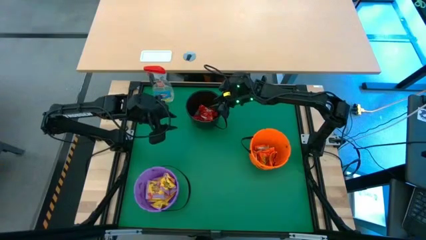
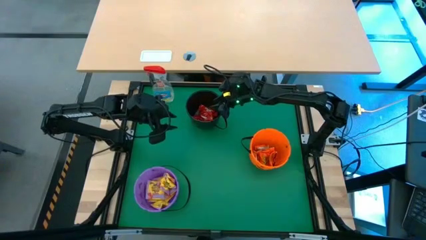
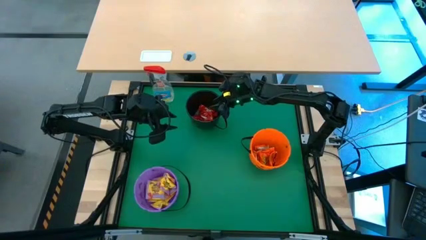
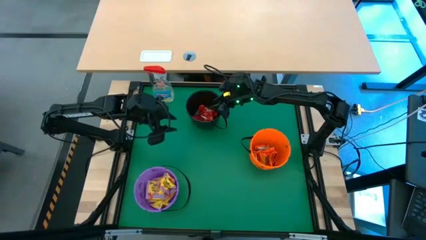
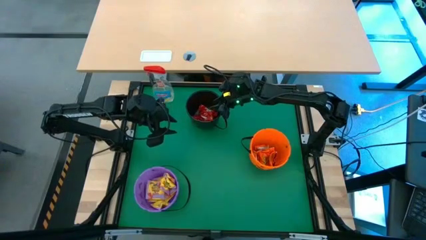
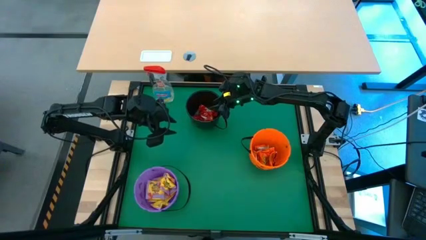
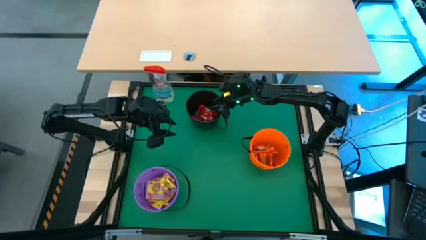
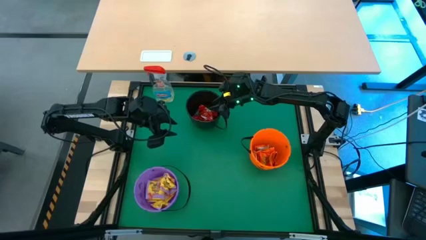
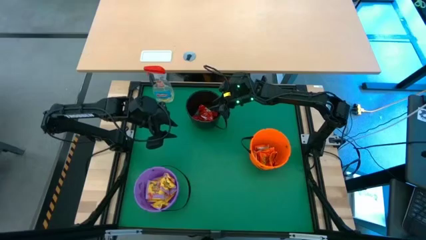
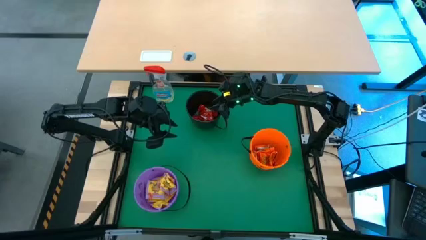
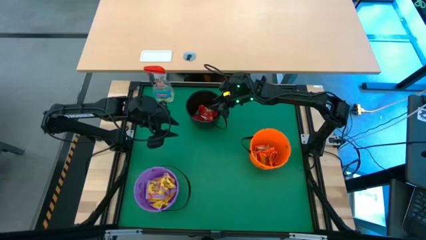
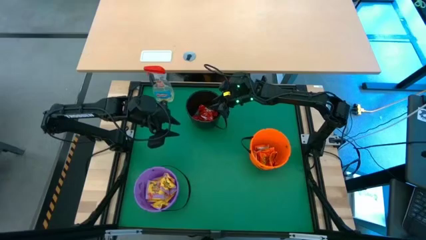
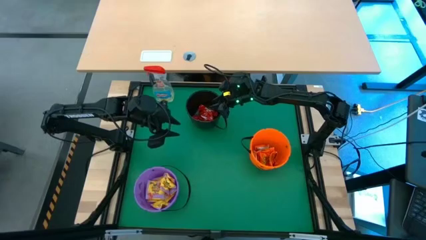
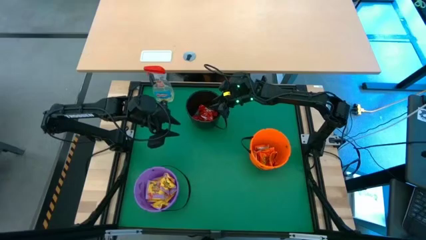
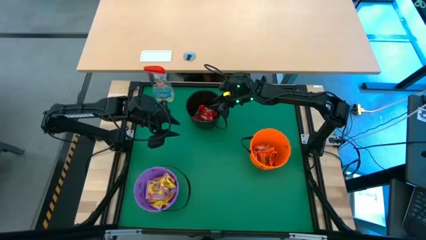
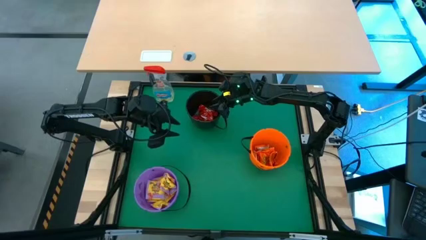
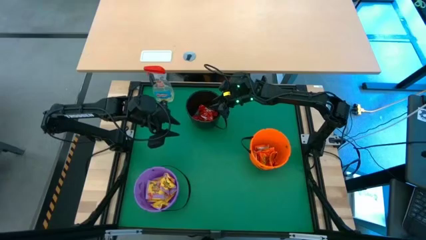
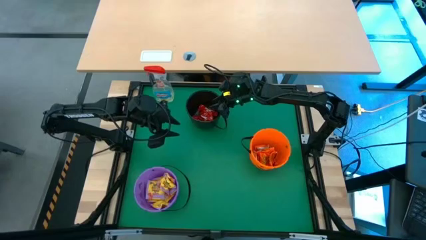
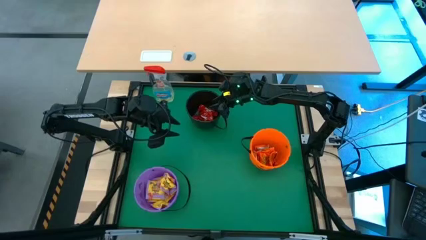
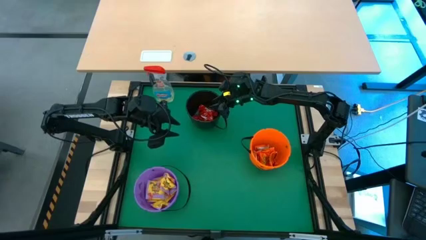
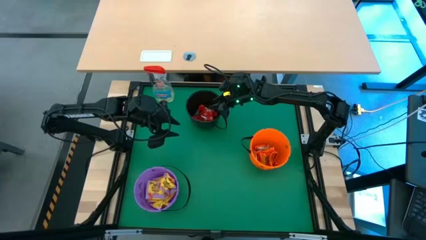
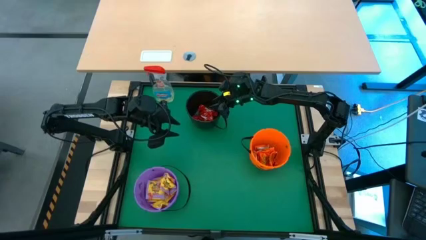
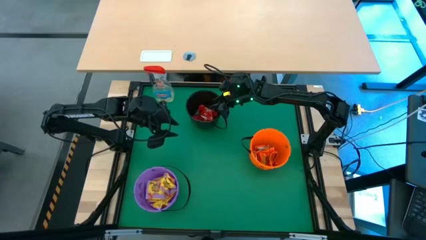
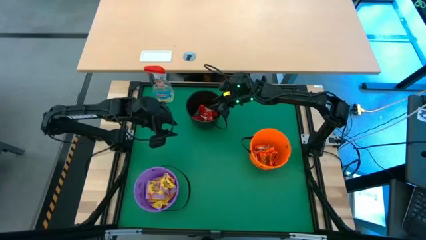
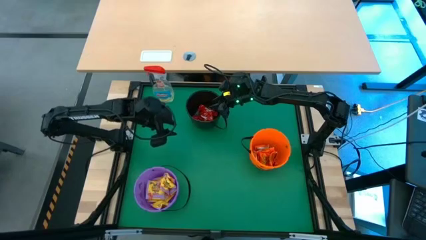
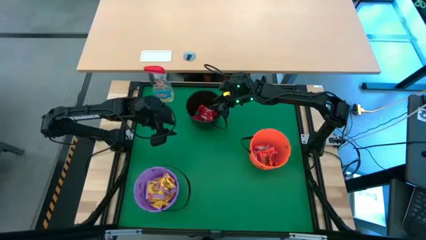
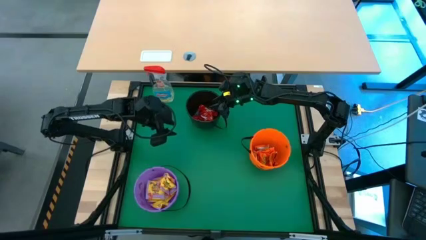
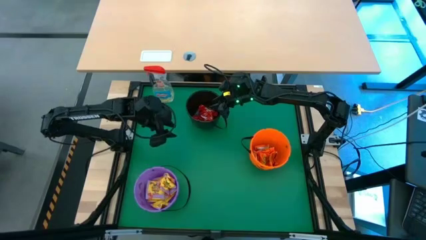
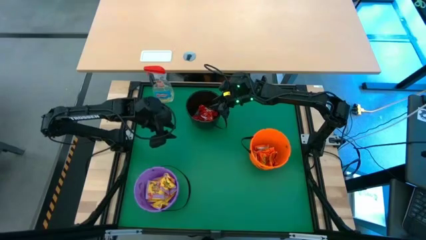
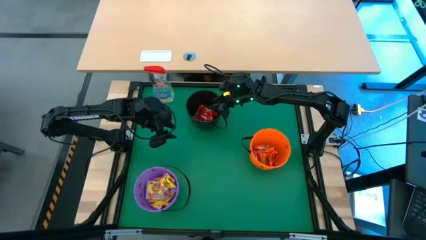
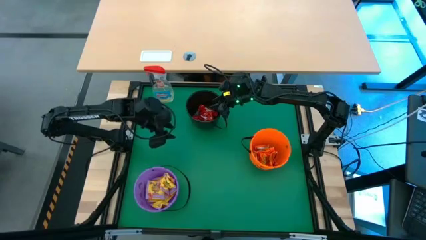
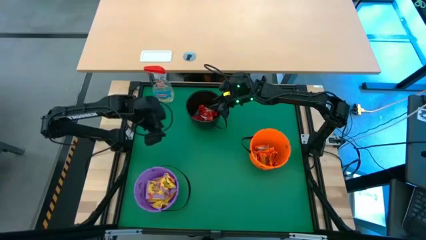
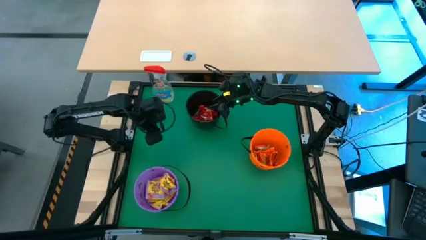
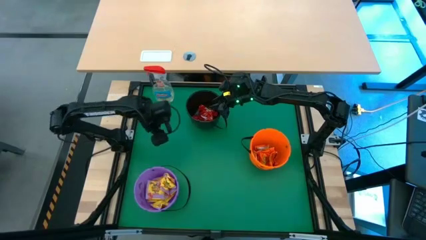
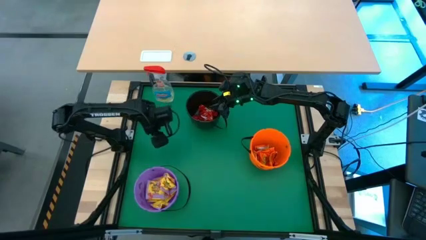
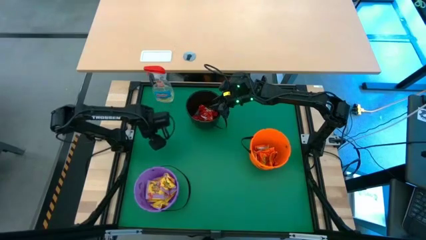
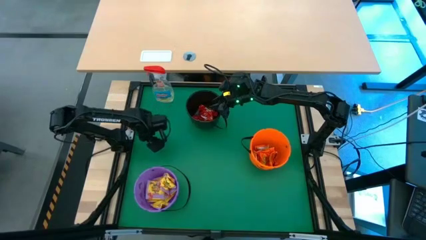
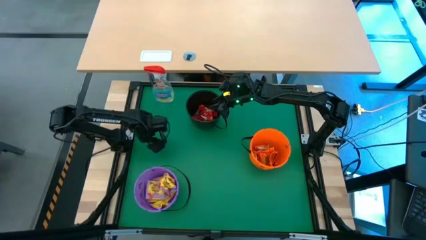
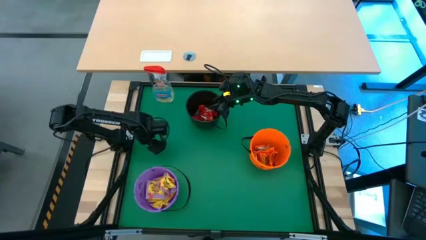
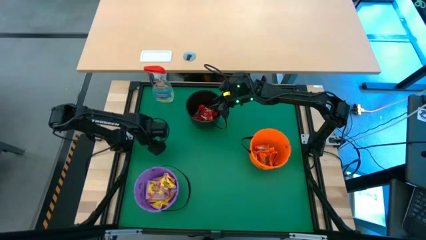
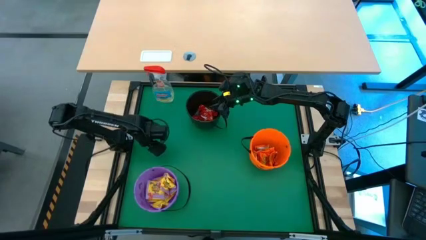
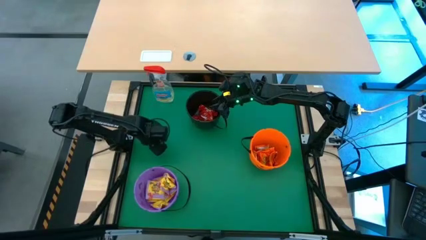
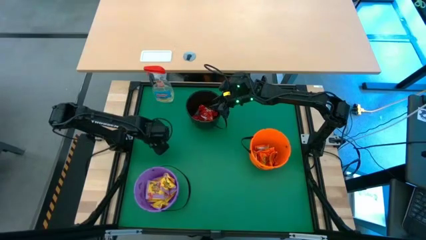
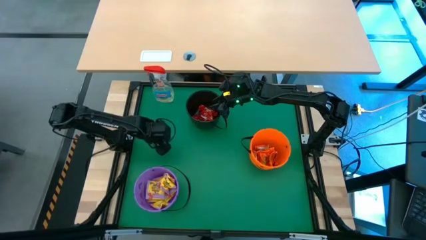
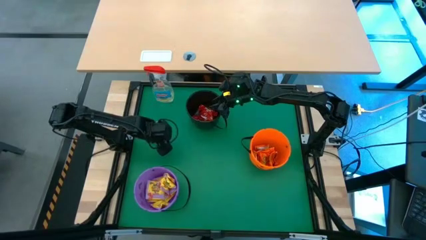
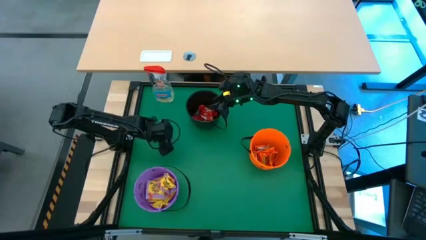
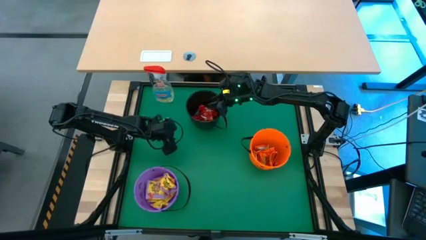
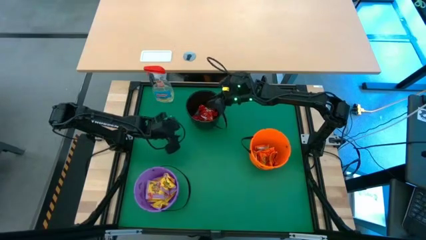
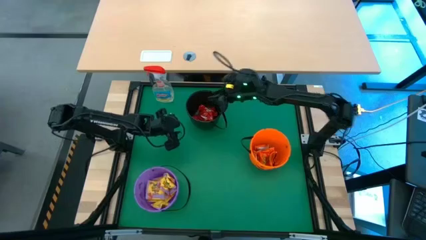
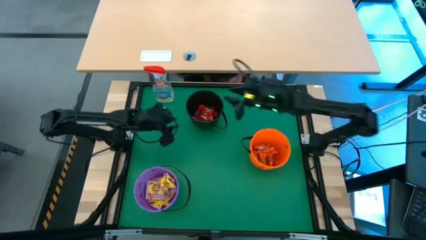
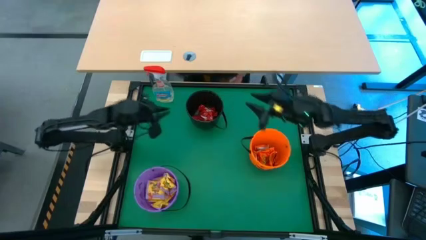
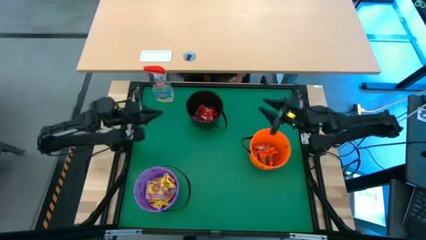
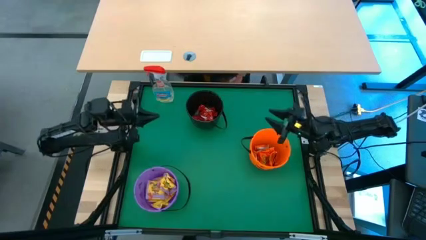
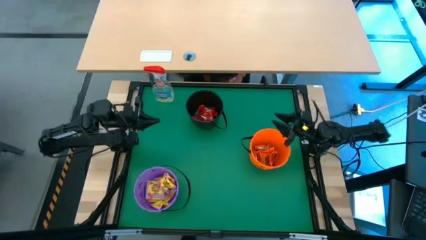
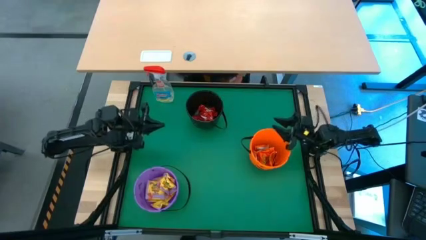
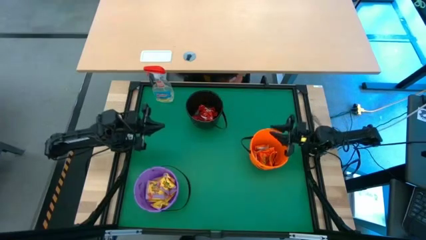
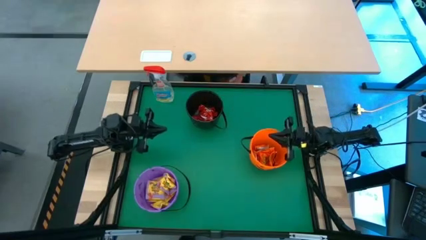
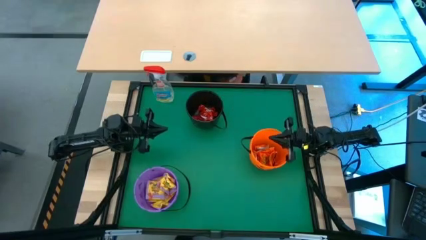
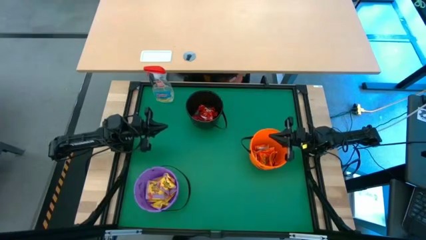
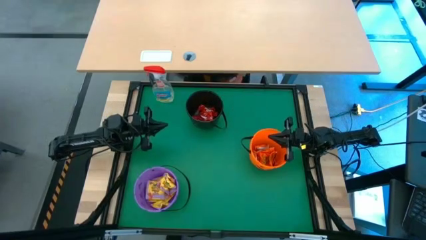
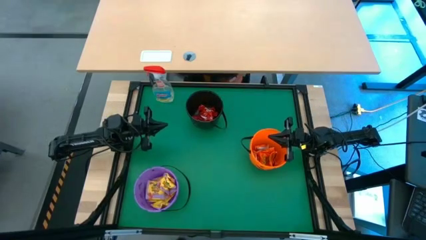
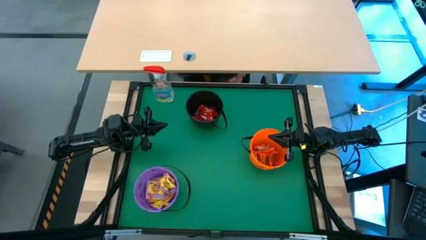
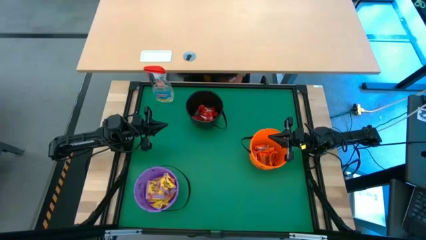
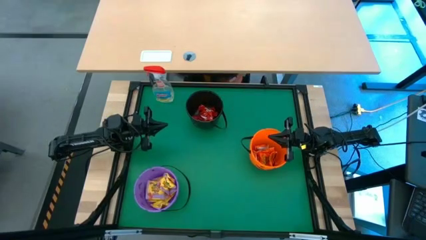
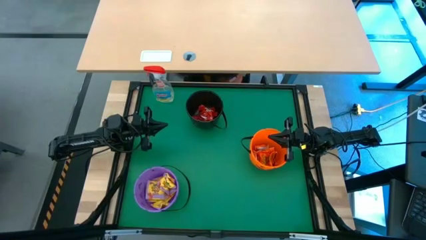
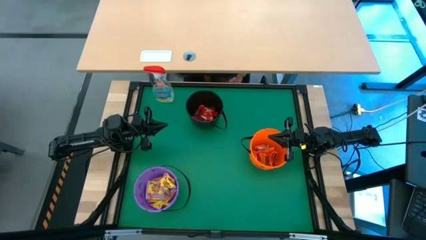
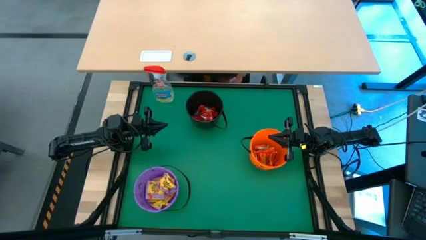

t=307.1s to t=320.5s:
Task: Sort candy
Return to Home Position

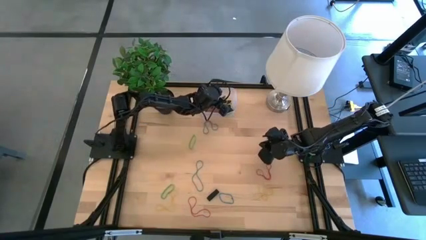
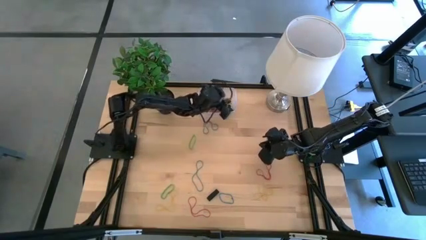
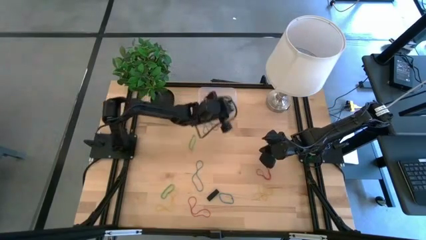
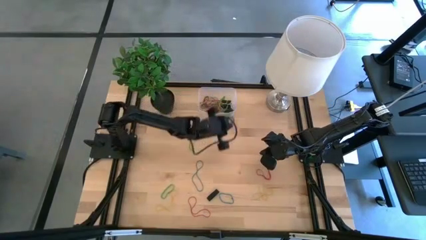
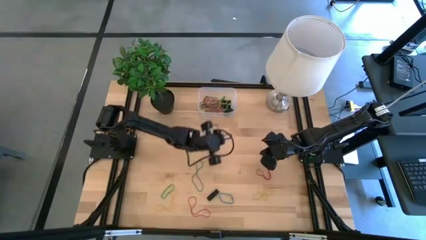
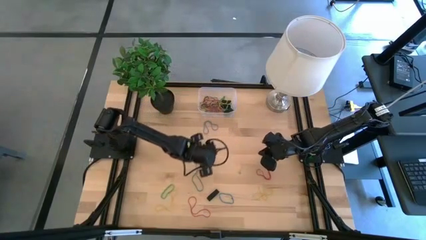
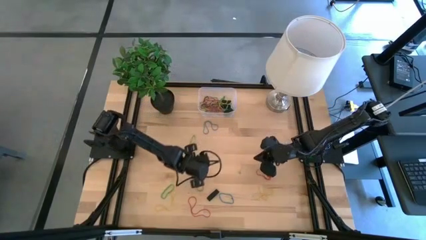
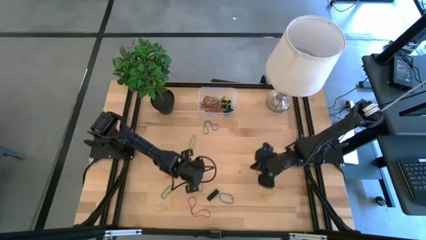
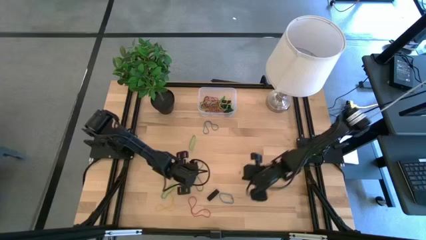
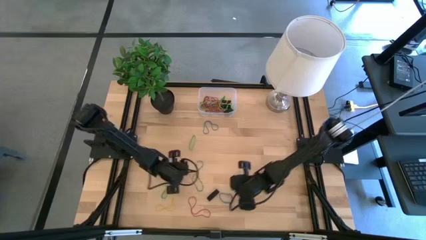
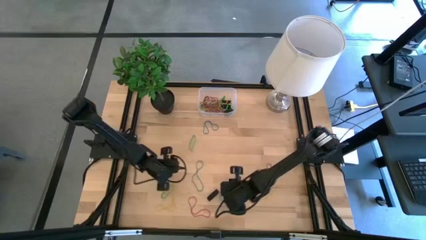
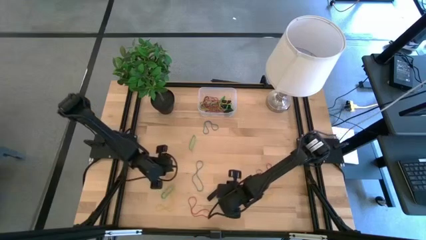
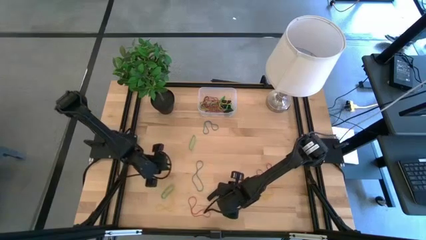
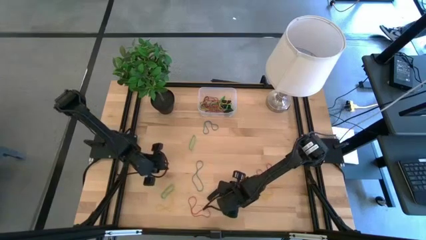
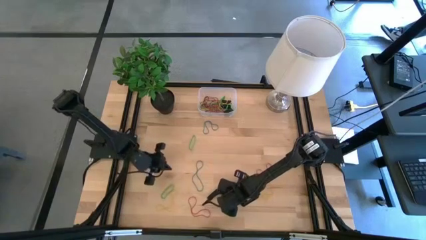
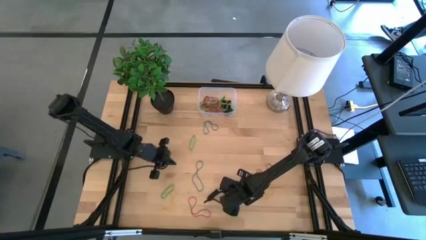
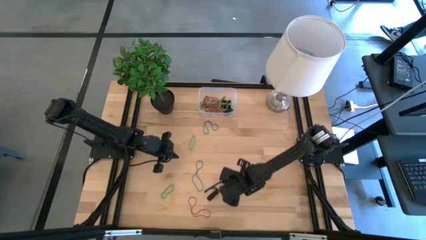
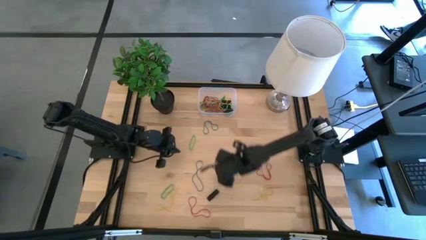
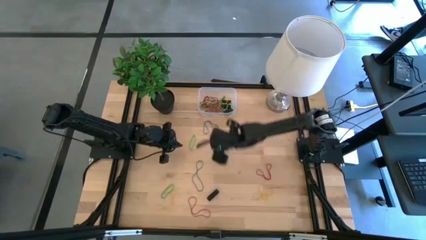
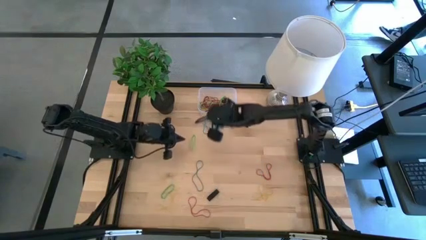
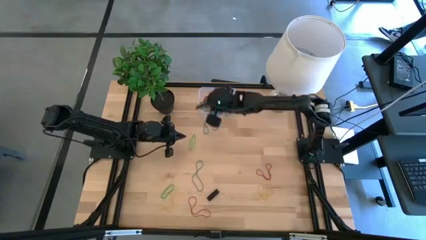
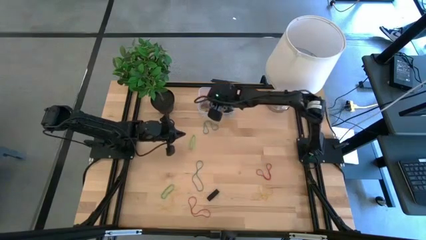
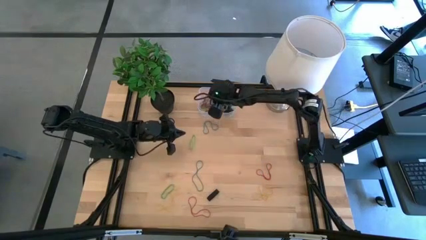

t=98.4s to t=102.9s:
Task: Pick and place rubber bands into bin
Put the blue rubber band into the transparent bin
